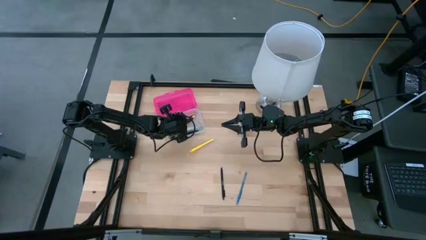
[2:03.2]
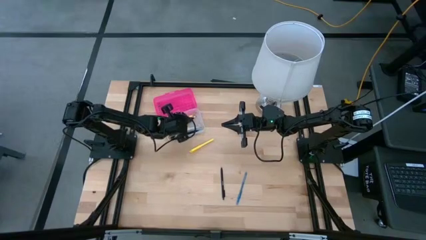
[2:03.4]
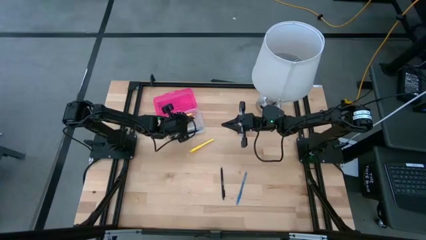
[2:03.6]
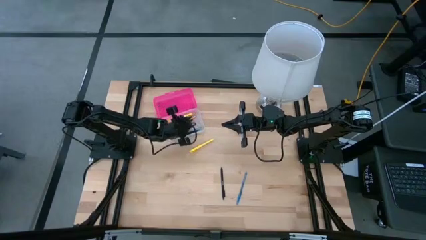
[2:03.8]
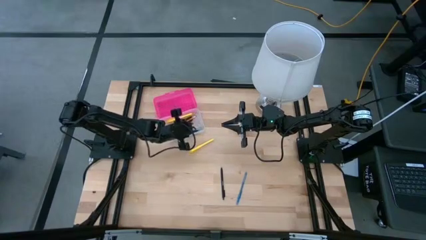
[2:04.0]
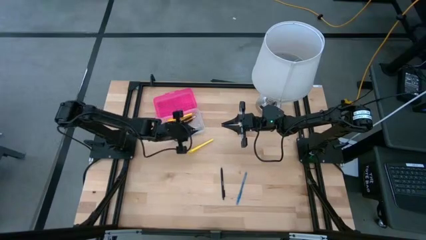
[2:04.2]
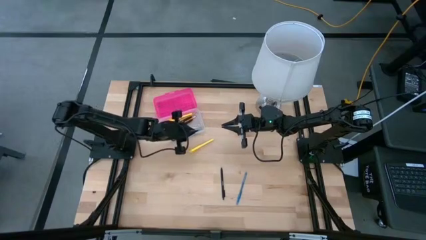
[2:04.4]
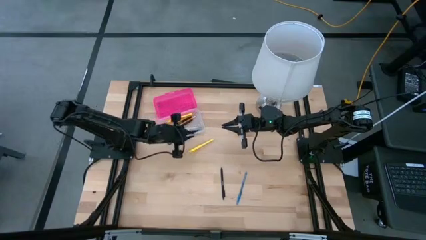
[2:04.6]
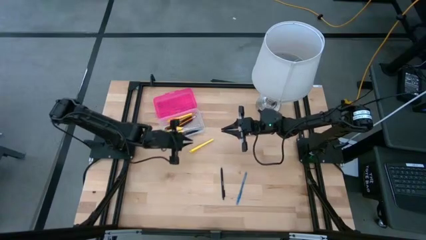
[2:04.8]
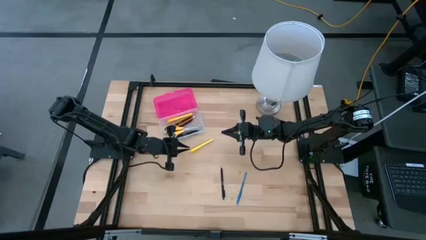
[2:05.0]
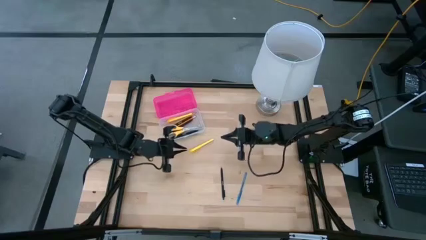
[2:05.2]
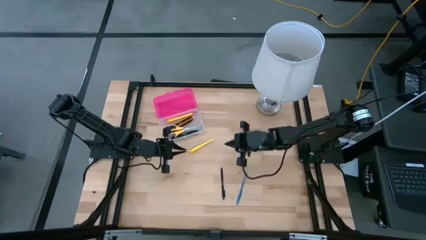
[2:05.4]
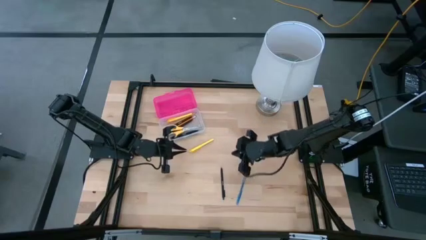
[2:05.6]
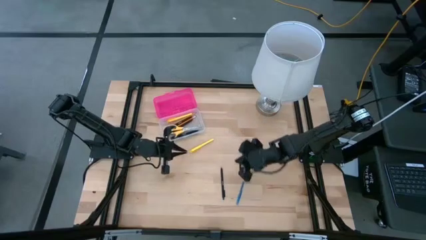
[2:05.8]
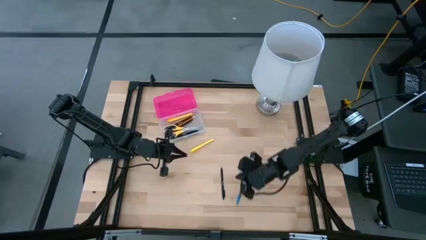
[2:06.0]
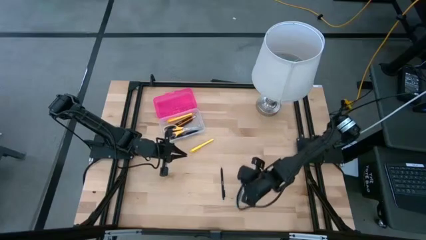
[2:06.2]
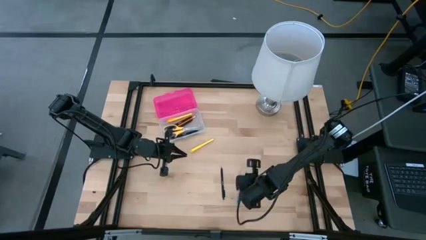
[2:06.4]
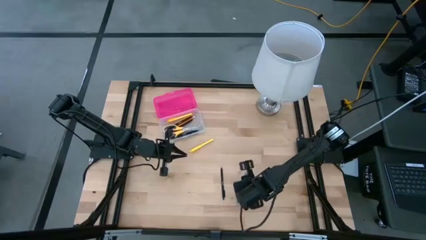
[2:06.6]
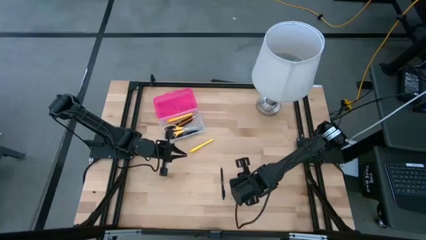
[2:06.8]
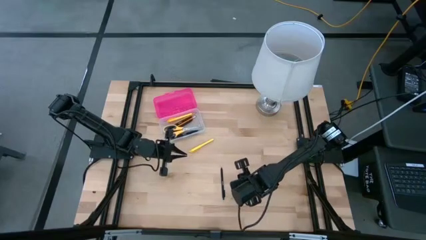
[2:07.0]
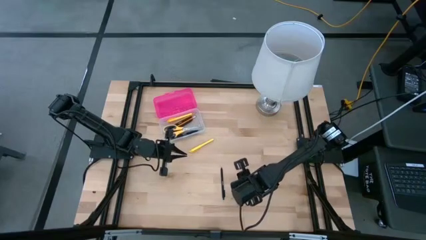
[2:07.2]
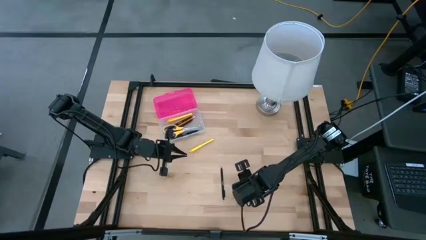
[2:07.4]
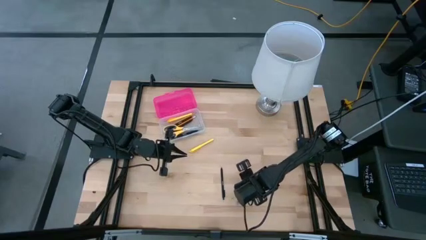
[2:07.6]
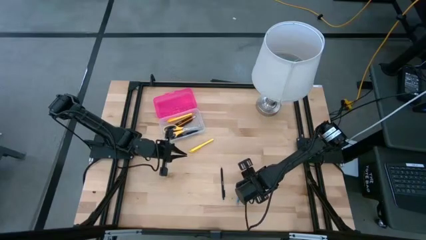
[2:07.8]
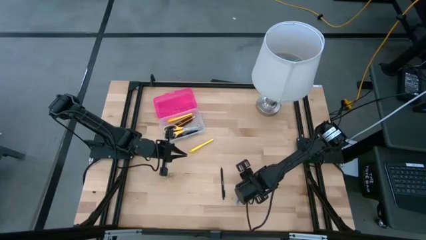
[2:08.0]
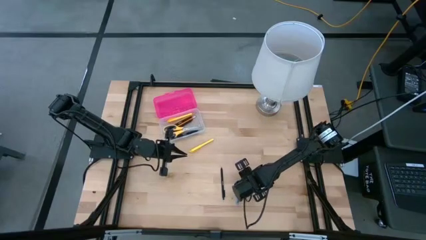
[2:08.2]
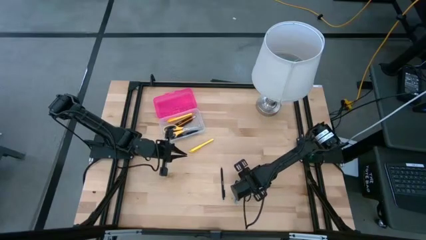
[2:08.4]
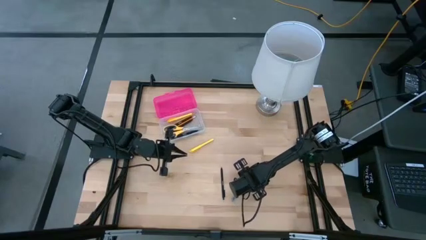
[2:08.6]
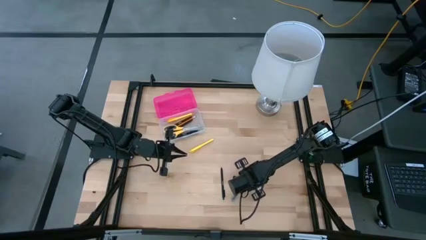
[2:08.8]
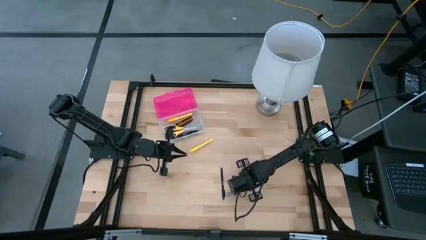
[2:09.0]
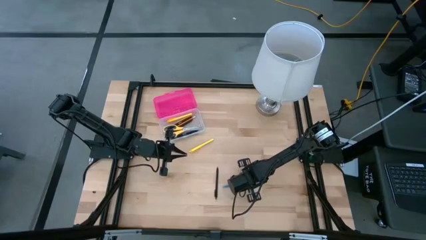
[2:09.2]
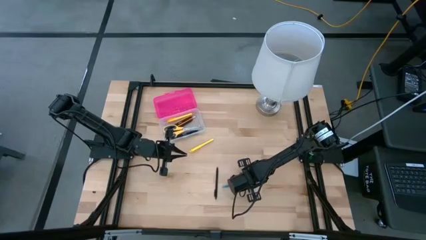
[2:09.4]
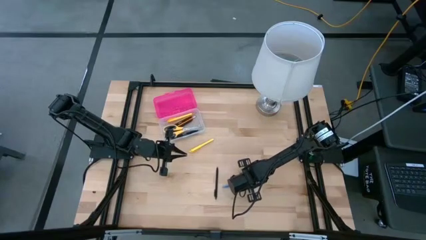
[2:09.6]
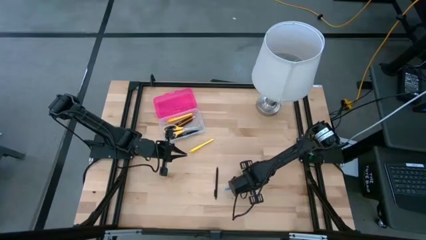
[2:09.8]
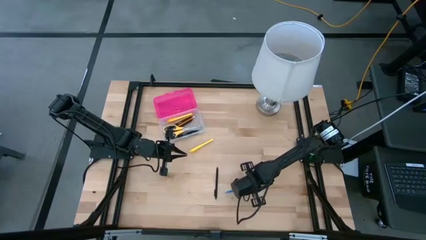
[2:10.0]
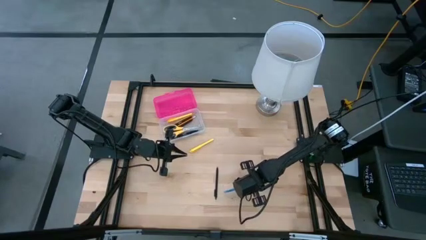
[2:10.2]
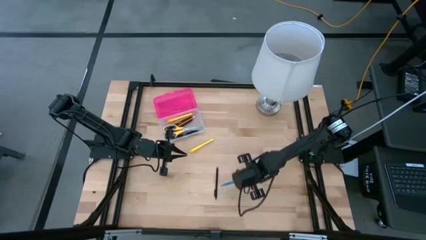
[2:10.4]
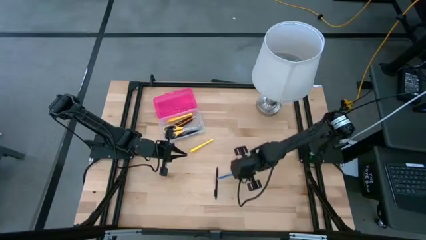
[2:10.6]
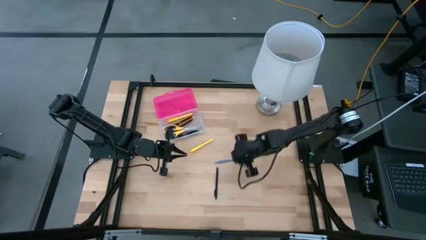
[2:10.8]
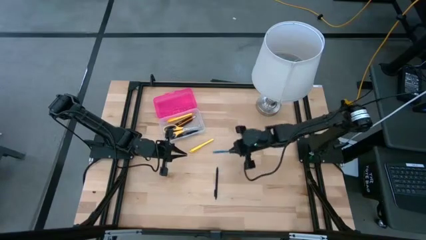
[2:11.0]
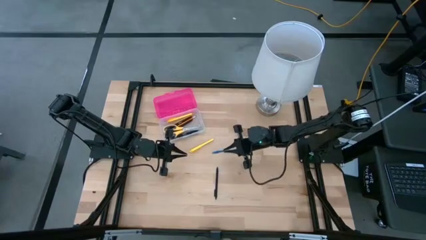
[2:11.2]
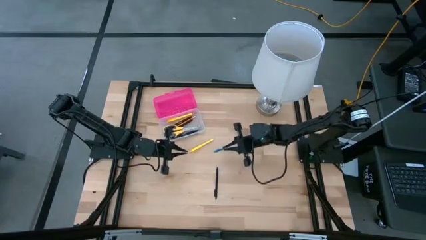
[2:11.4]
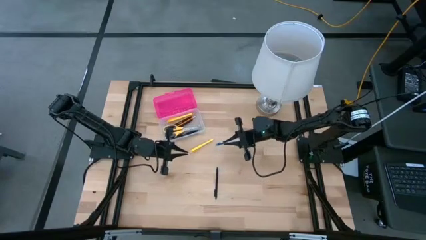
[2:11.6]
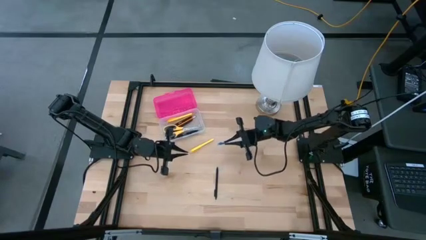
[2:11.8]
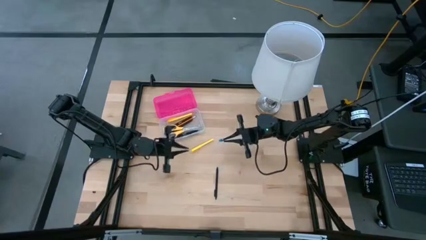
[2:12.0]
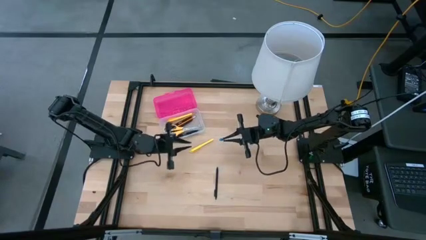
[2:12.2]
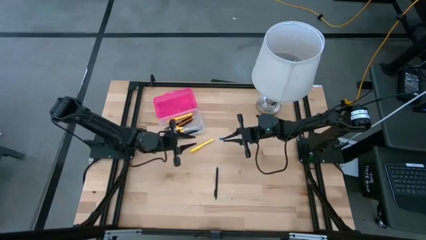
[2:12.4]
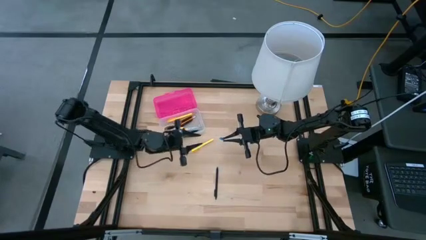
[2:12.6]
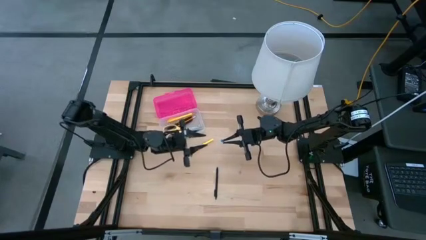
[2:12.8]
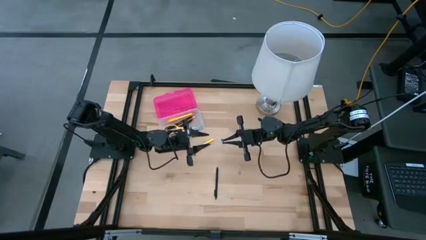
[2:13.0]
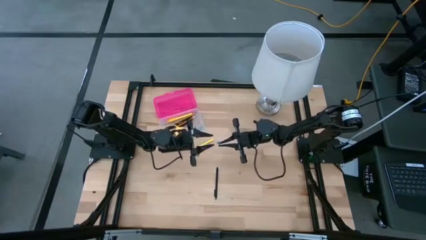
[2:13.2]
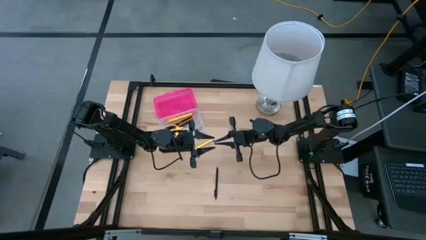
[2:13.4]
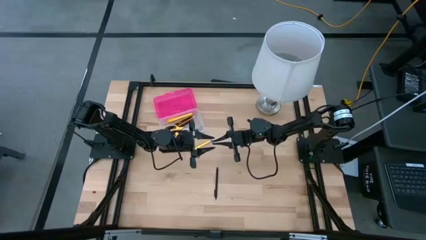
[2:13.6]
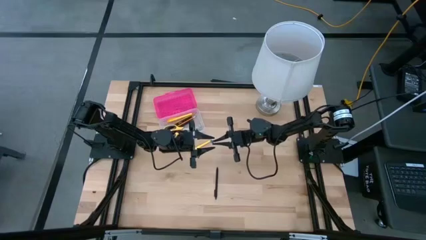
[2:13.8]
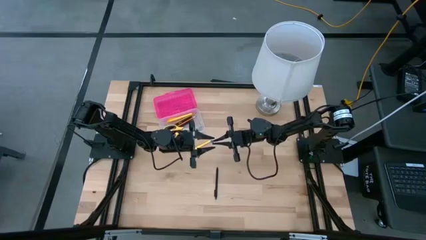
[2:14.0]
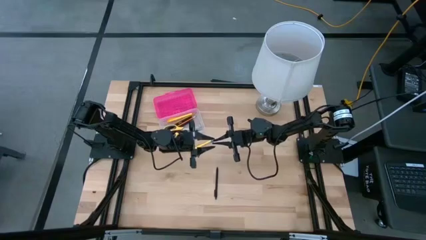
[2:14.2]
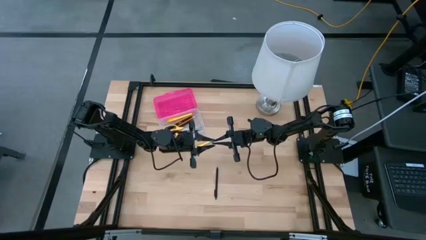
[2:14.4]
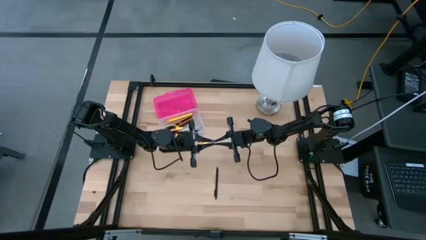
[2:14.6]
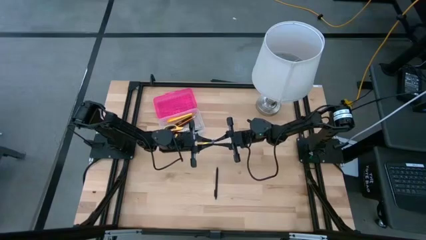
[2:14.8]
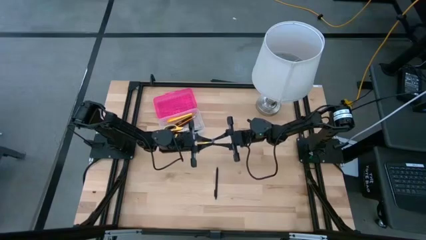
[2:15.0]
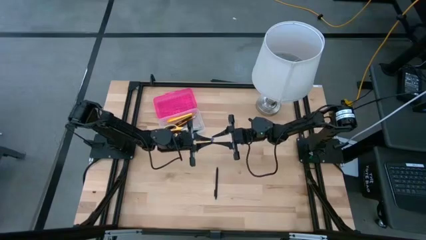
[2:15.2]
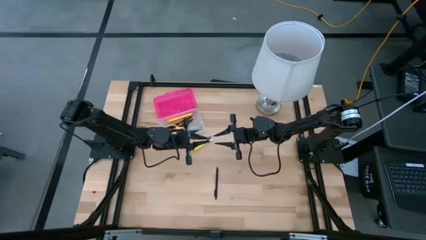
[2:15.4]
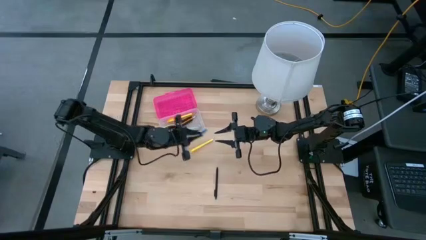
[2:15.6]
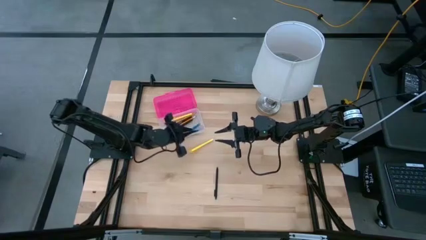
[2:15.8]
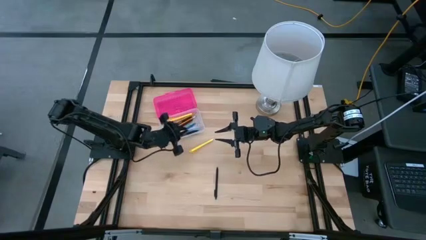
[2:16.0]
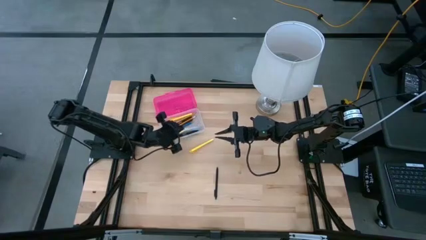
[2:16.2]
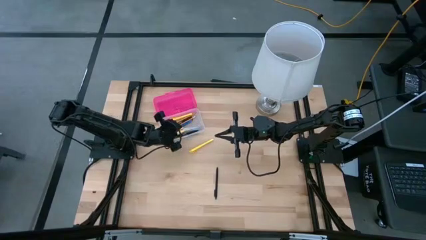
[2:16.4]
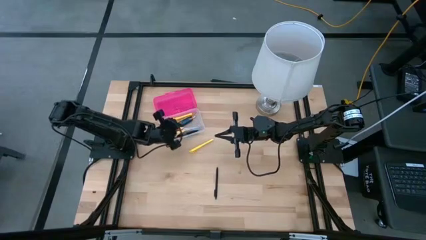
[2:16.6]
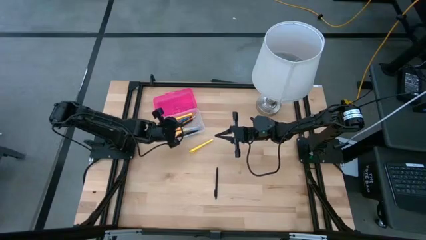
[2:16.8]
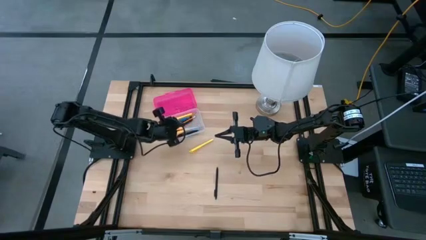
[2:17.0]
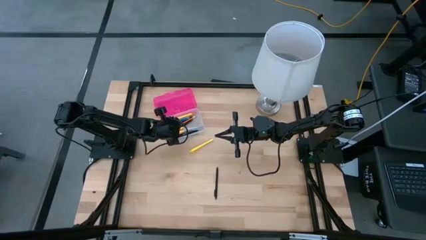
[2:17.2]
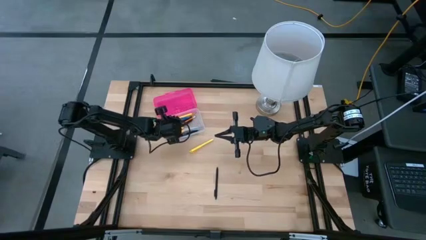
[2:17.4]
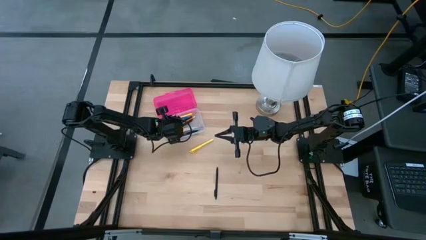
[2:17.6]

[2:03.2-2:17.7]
Task: Pick & place school supplies into a supply box
Put the blue pen into the pink supply box

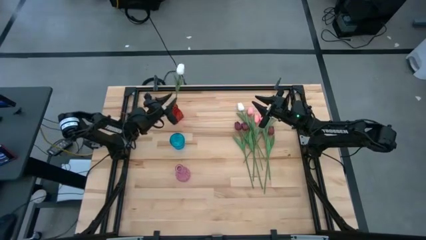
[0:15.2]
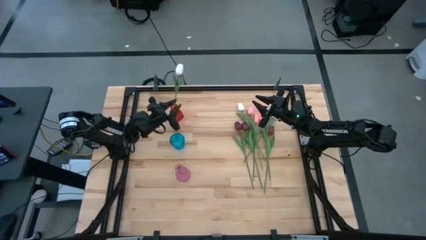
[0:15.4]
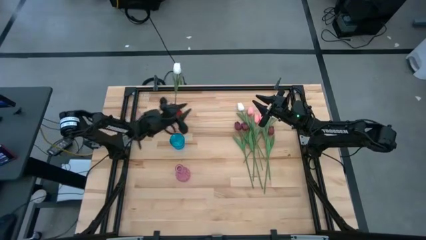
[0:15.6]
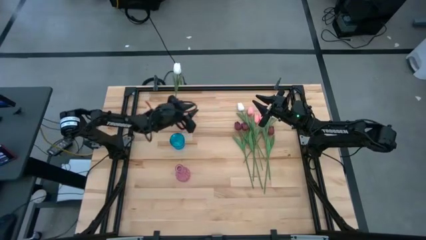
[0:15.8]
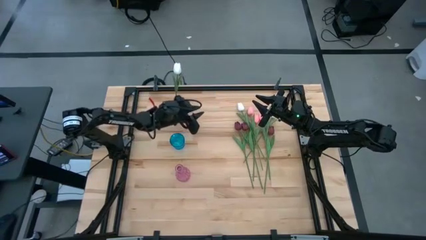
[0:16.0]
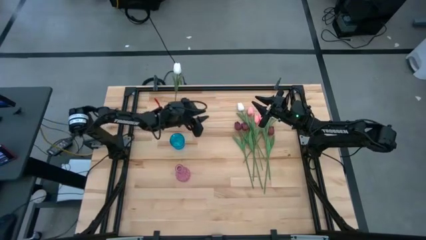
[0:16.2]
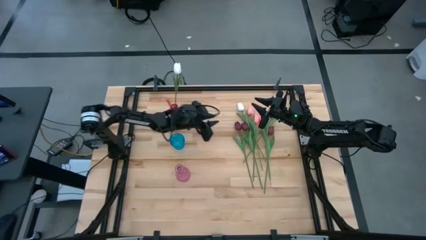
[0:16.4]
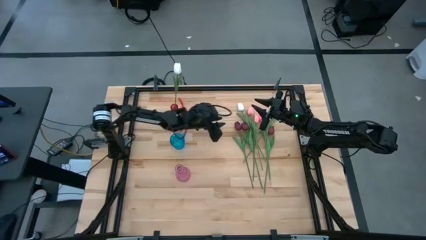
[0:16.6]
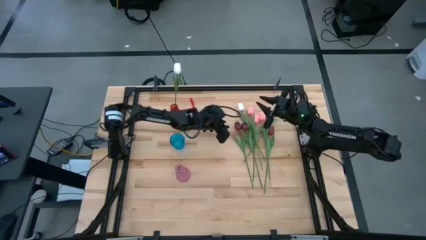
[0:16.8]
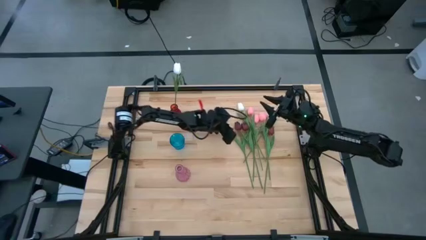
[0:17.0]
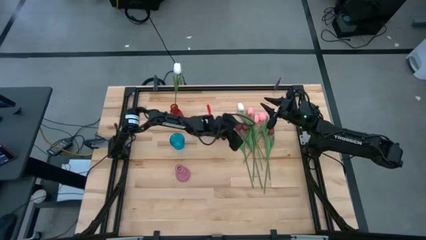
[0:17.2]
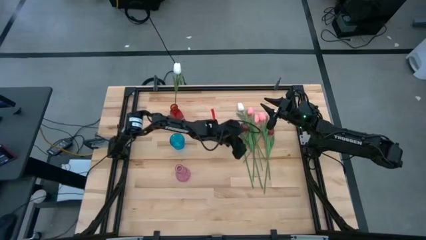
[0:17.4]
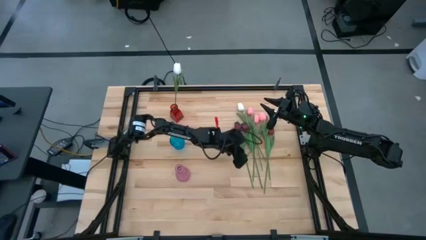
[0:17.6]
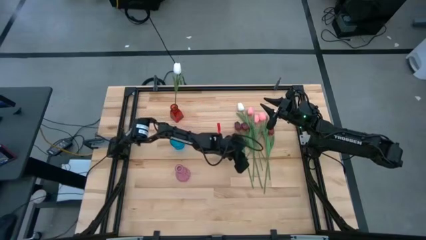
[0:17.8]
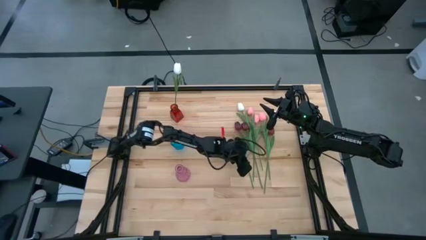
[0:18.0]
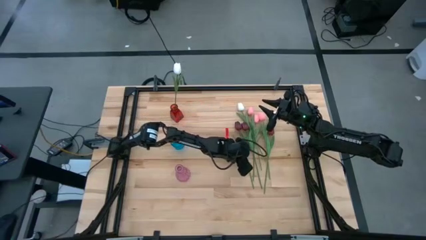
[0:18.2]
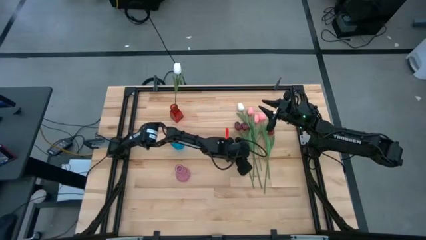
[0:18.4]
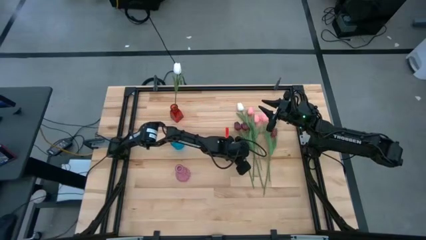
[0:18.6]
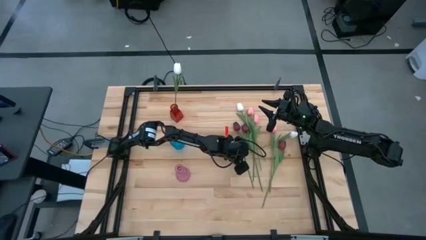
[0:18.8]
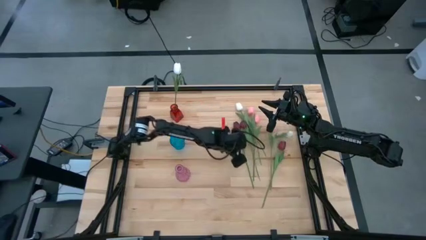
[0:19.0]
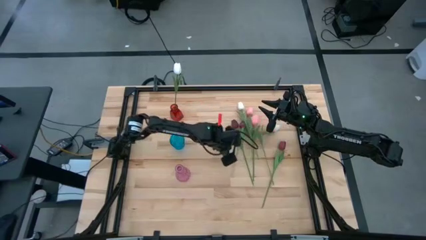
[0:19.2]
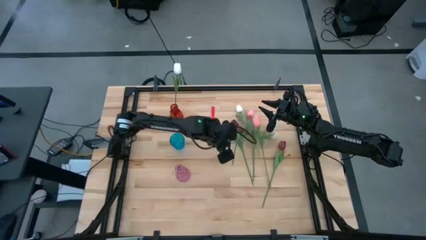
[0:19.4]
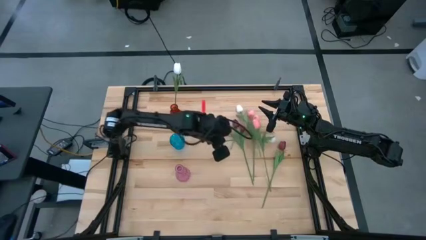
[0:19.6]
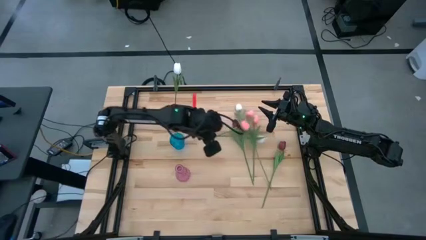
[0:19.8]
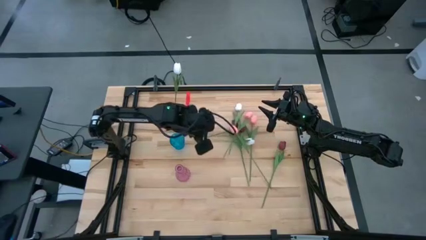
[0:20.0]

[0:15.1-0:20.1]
Task: Sort flowers into vase by color
Put the left pink flower into the blue vase
